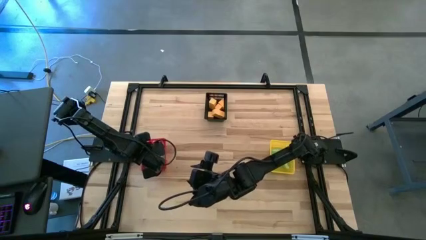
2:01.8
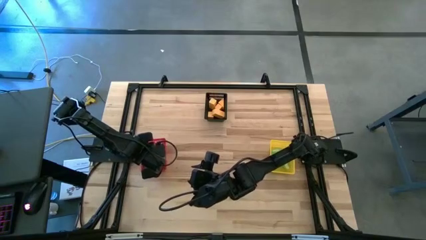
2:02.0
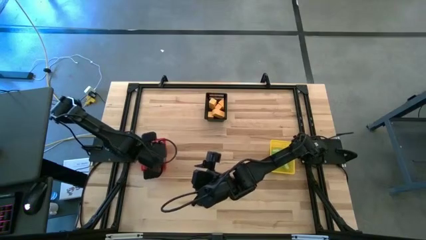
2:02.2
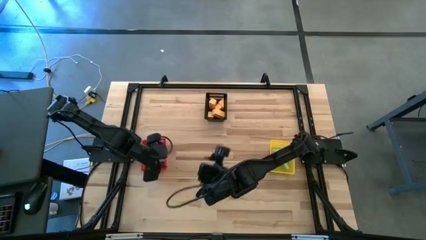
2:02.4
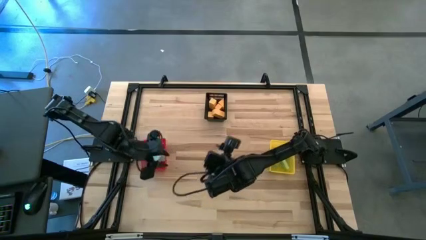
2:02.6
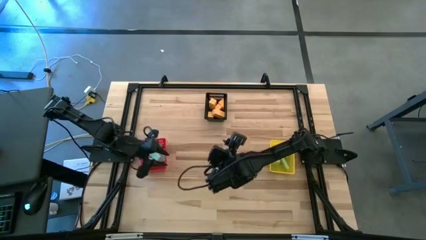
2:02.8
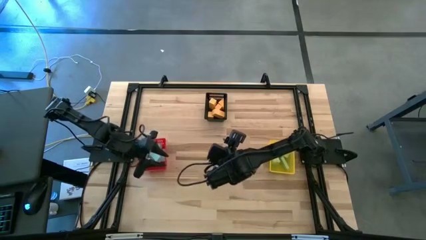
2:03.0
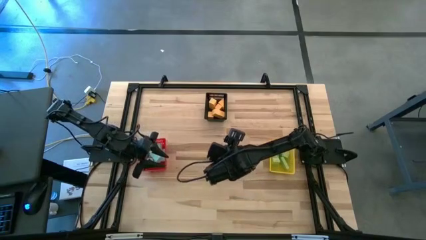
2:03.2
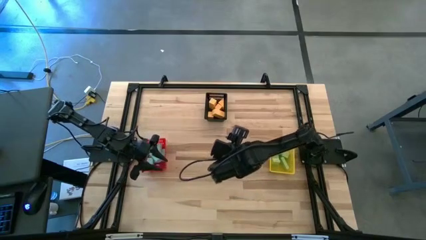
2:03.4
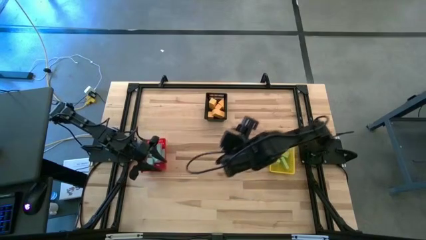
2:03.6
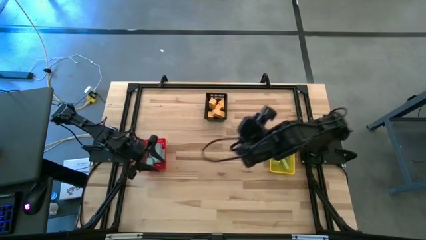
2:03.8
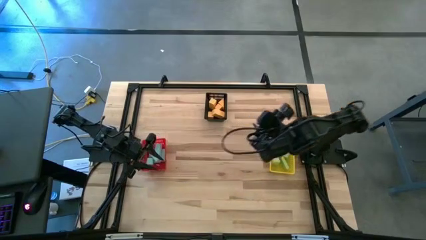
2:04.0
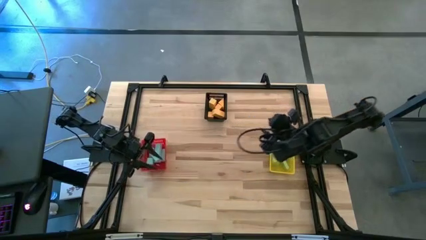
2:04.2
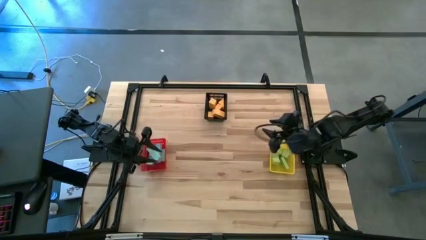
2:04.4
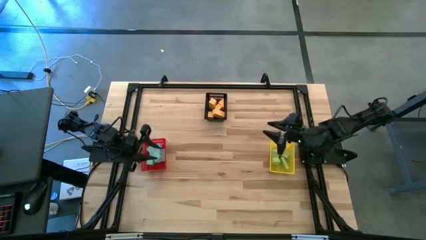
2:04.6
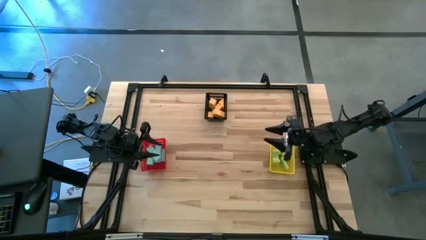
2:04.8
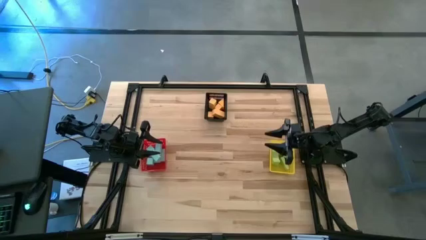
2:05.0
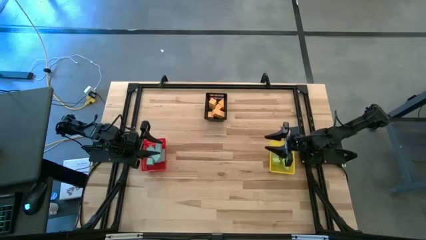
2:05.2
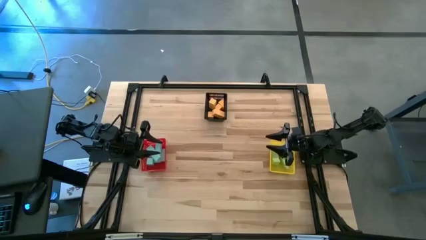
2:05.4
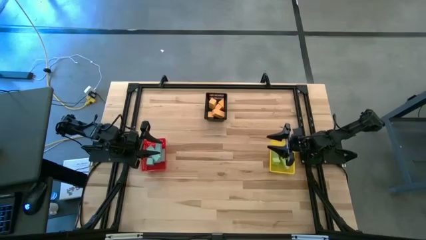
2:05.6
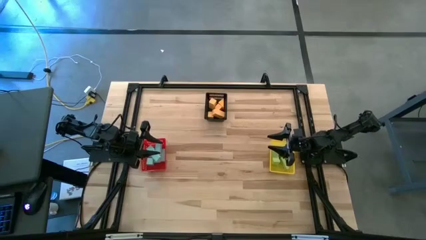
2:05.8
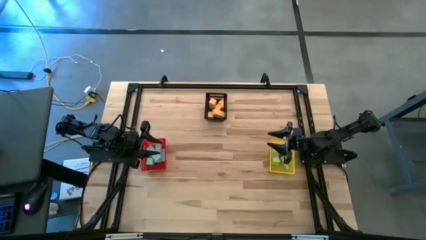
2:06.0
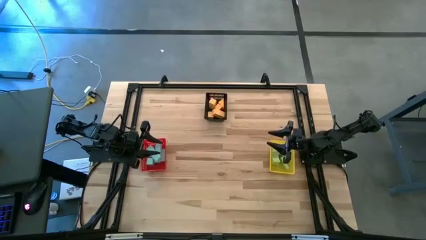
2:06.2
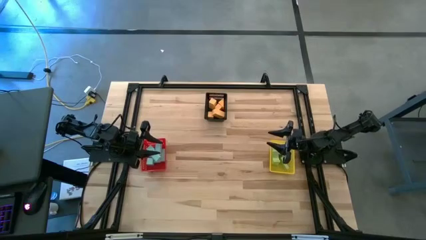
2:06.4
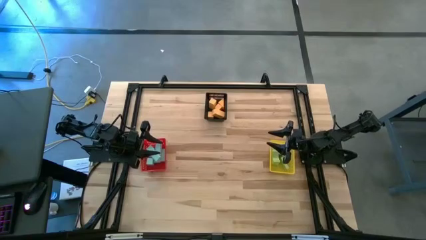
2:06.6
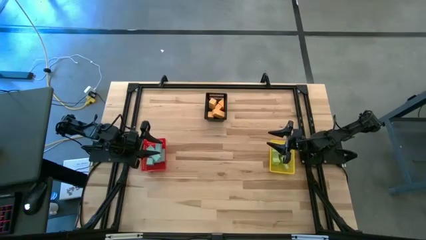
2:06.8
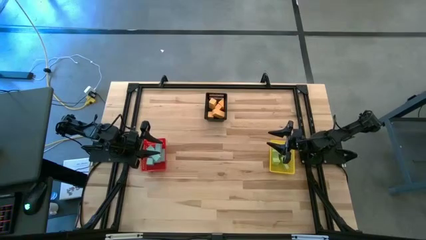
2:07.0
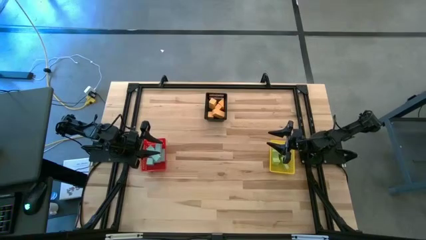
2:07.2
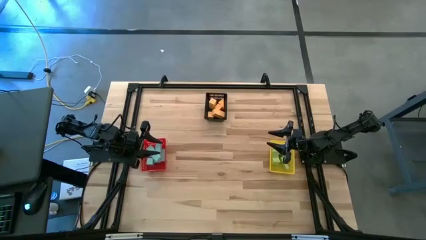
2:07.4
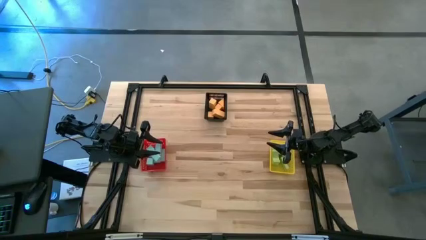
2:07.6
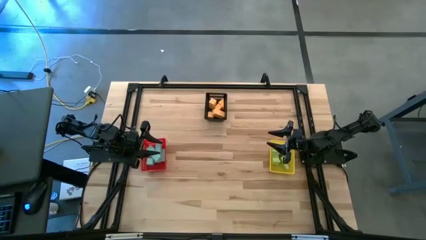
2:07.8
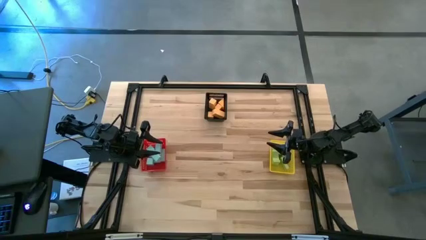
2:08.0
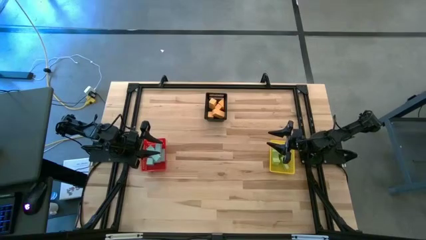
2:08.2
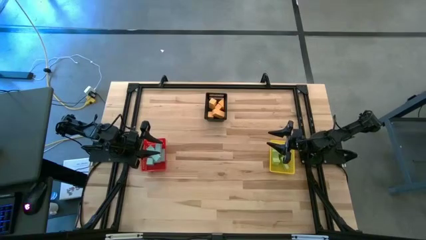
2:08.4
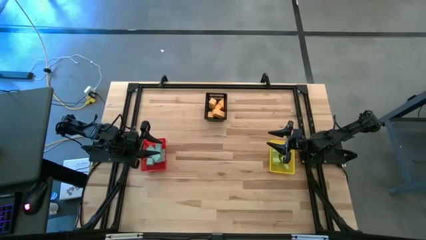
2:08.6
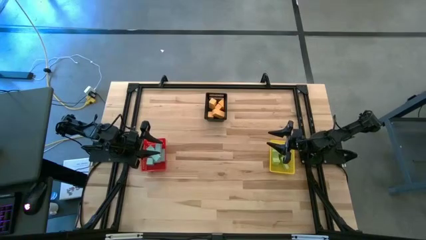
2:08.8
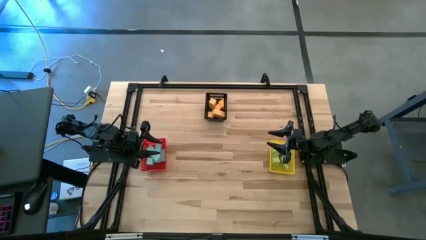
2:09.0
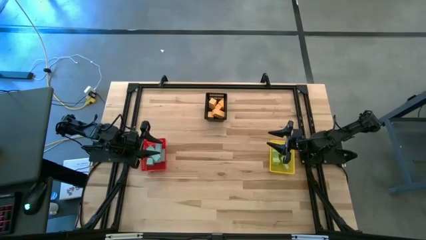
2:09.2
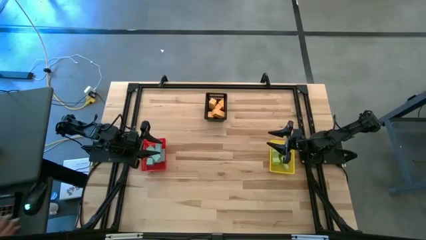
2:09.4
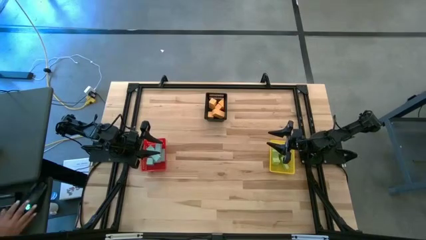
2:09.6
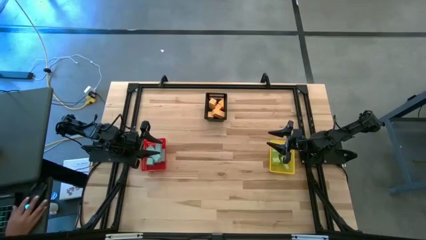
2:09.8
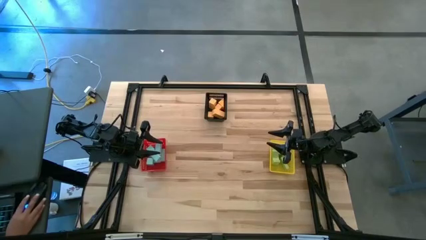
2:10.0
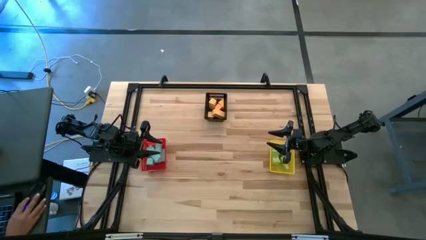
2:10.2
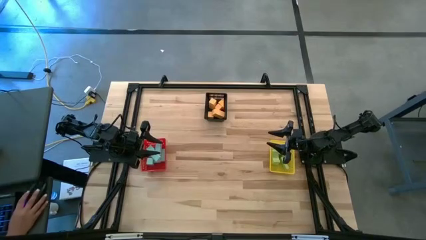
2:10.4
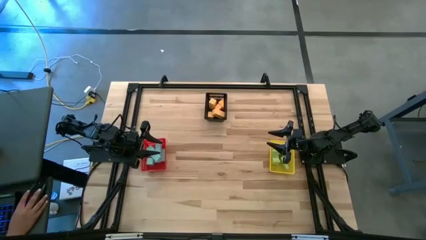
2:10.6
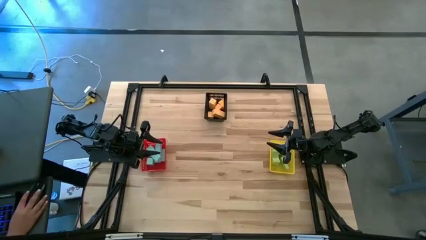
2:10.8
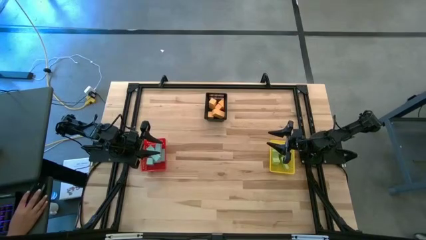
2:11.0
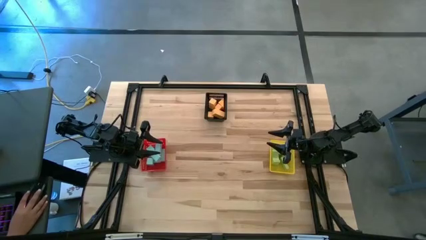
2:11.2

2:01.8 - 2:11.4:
Task: Sort & place blocks by color
Return to Home Position

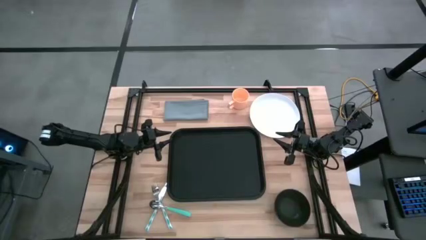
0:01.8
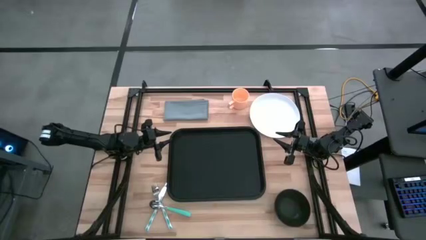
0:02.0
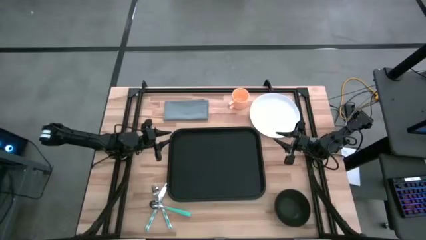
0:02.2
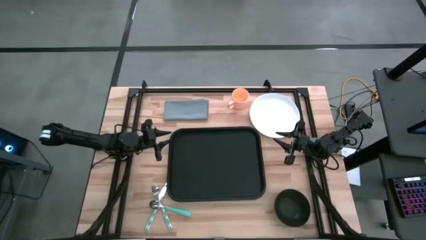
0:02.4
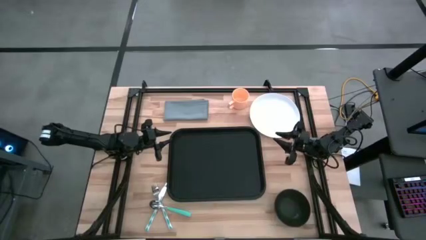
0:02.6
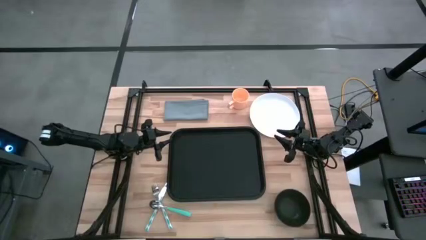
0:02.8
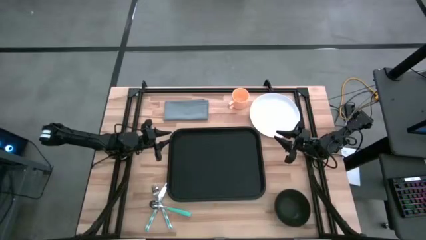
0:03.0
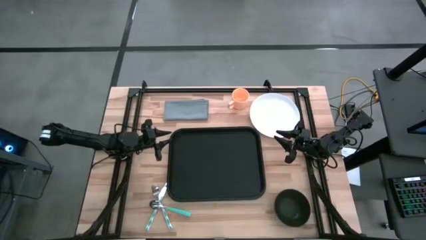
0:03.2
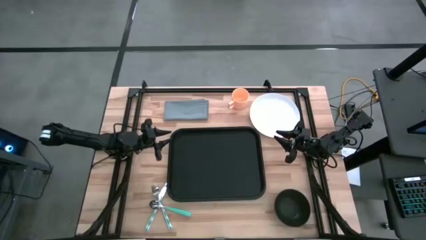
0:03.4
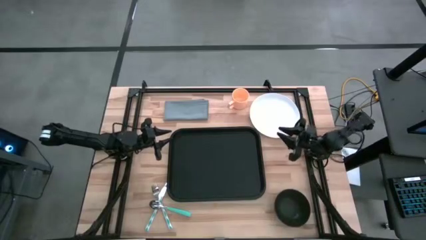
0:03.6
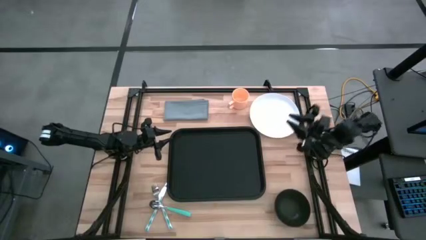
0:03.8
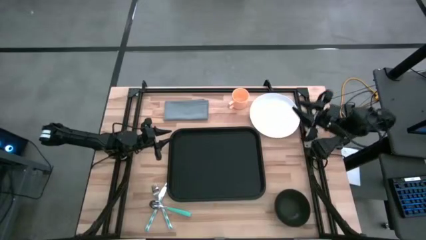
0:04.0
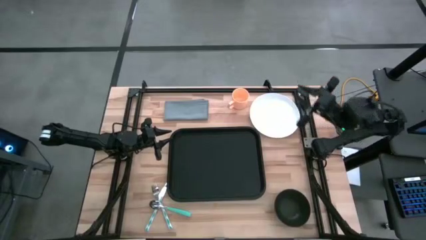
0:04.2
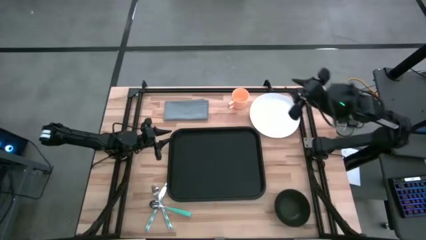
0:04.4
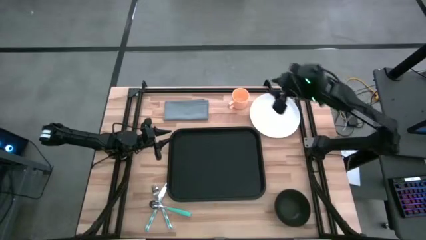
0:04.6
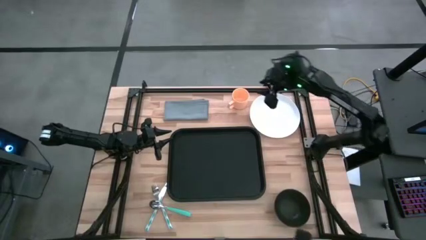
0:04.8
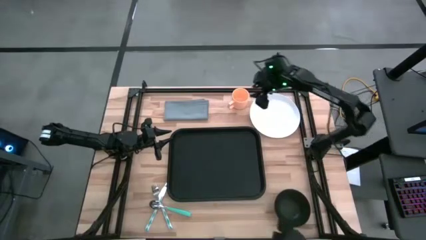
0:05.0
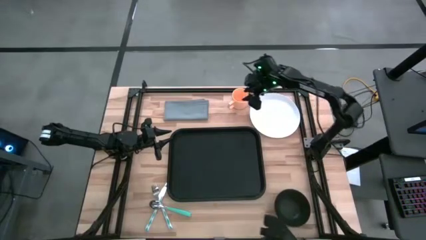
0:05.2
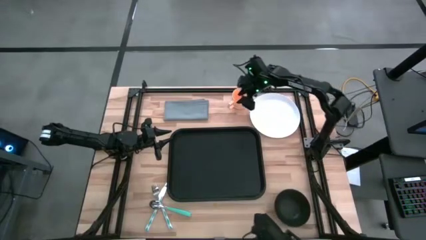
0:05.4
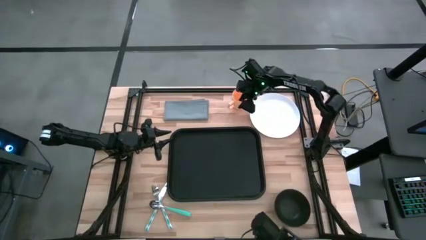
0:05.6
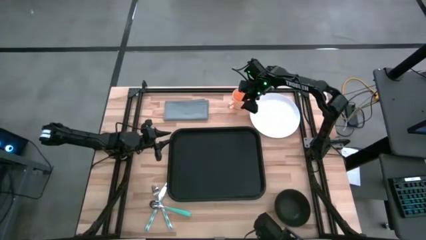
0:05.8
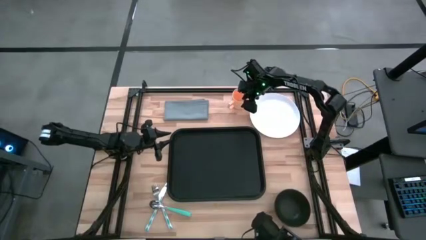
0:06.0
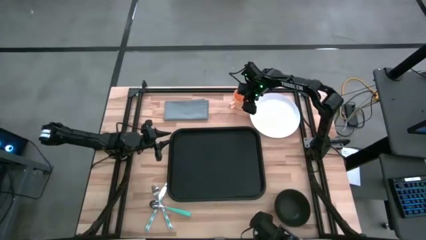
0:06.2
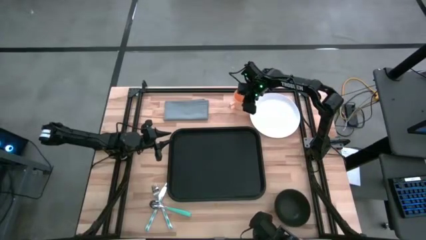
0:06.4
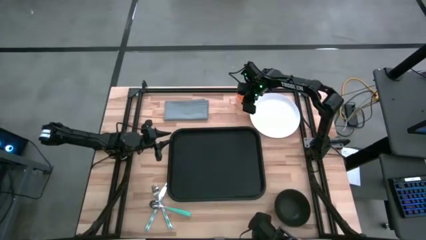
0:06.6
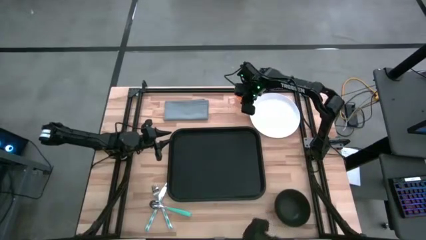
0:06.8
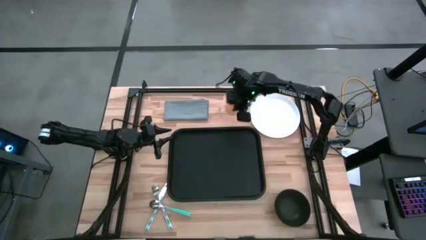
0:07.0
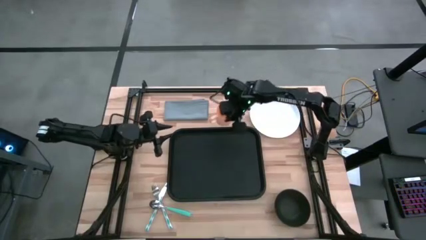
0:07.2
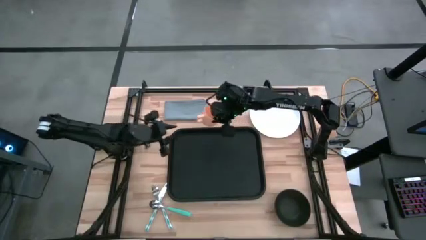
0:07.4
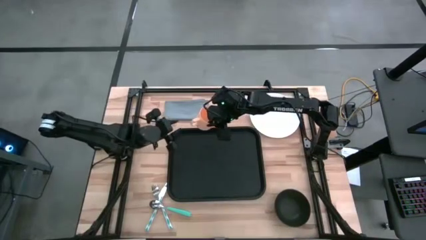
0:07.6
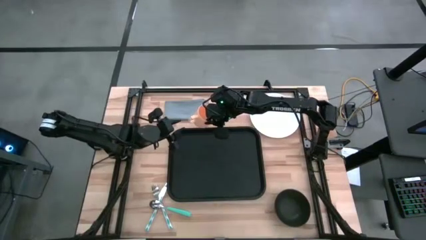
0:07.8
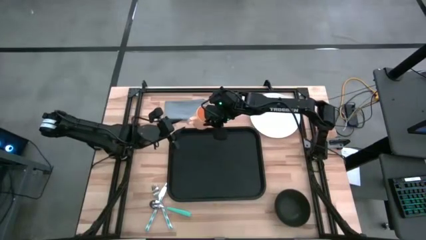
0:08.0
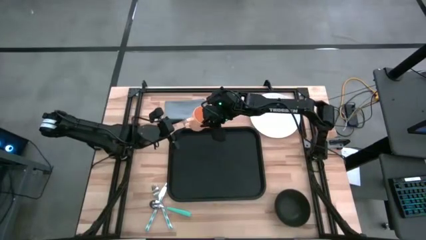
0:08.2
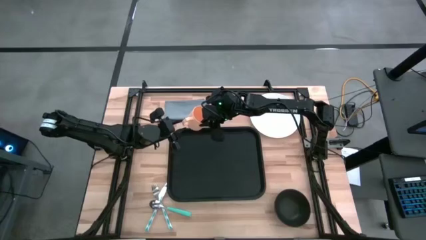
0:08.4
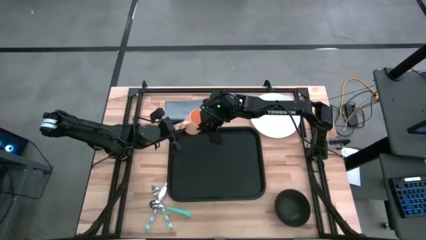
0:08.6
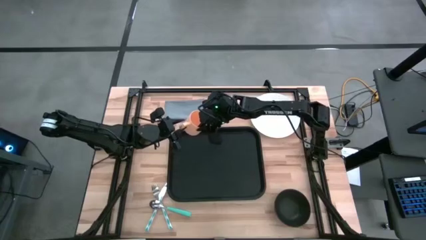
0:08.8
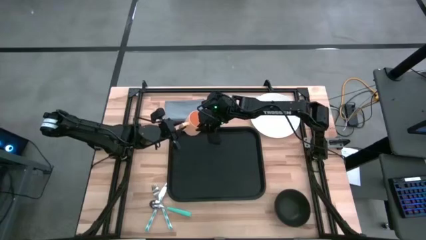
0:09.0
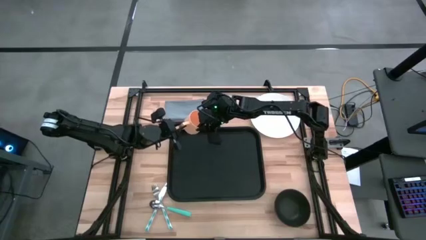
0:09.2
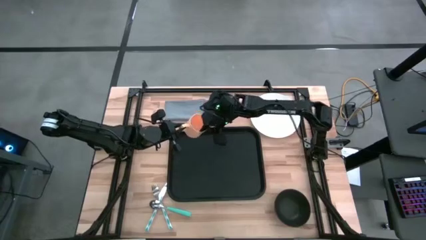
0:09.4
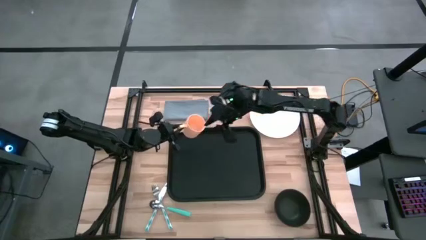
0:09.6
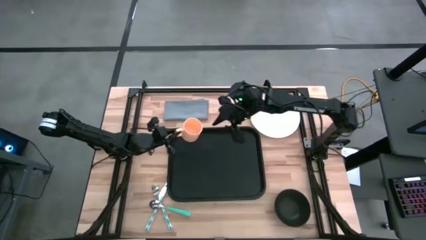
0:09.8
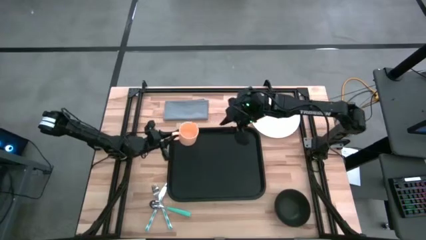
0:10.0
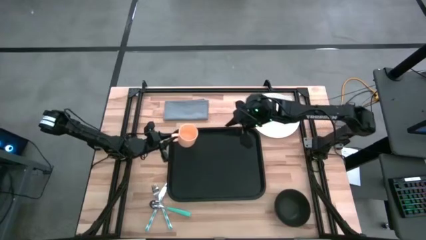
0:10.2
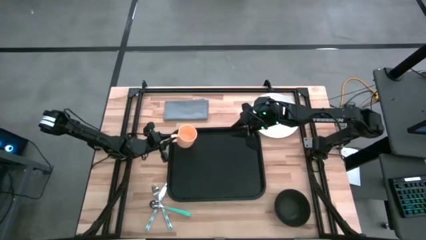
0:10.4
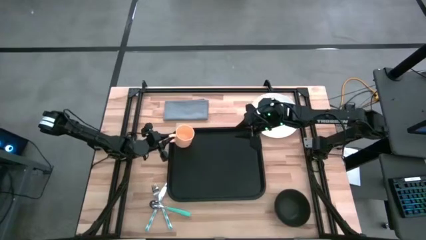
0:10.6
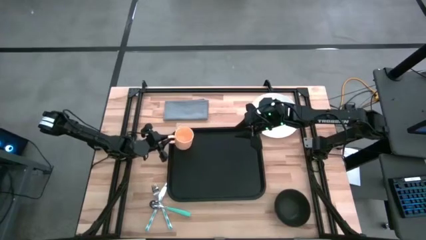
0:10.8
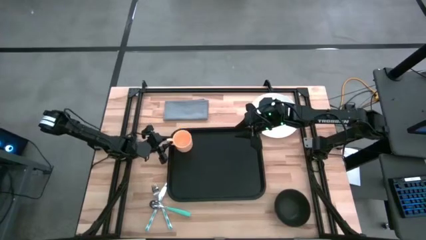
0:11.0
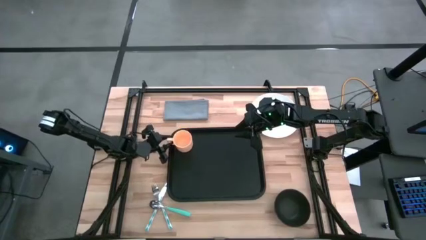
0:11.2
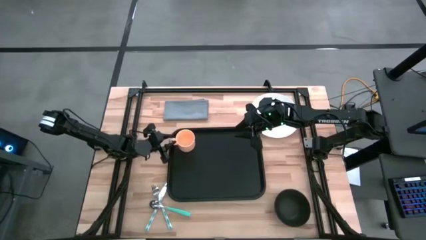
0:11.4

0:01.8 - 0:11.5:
Task: Set up tray
Put the orange mug on the black serving tray
